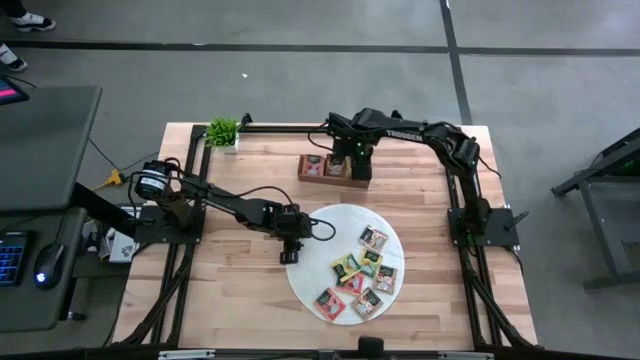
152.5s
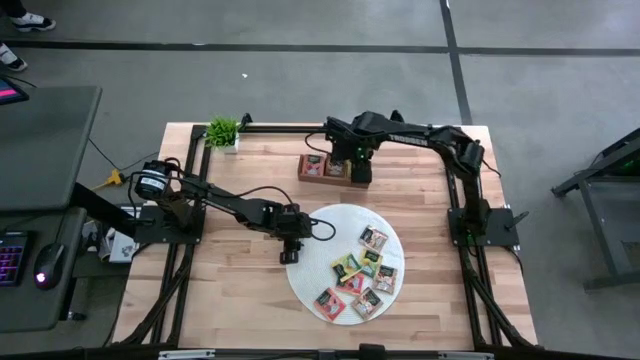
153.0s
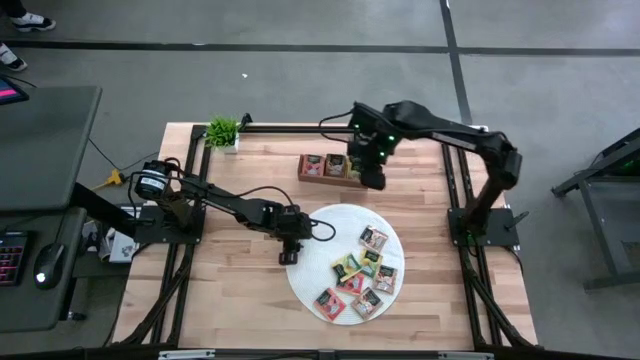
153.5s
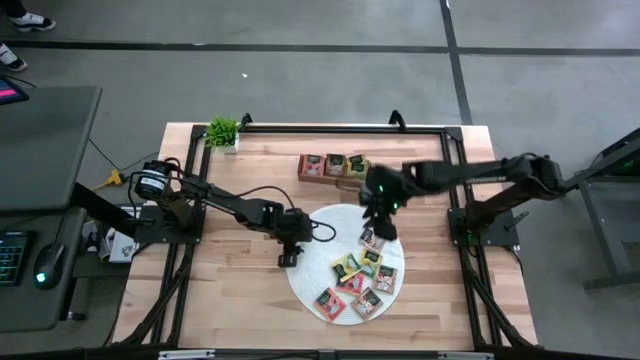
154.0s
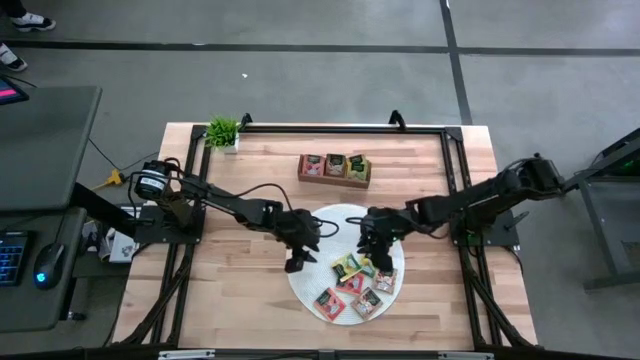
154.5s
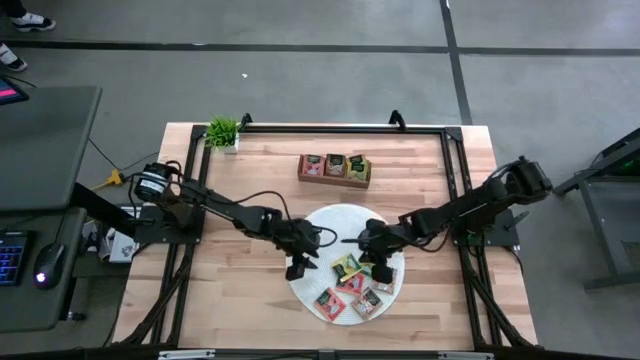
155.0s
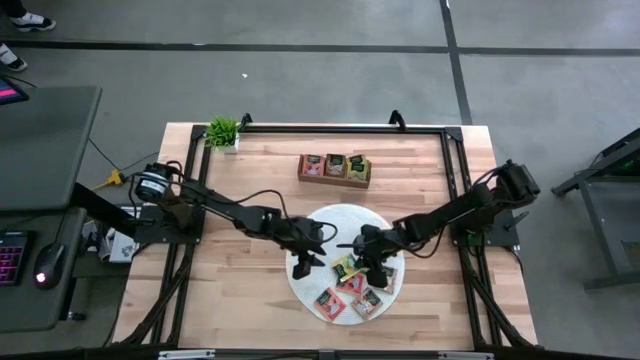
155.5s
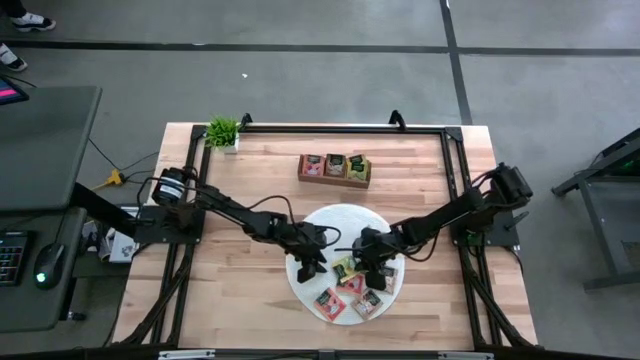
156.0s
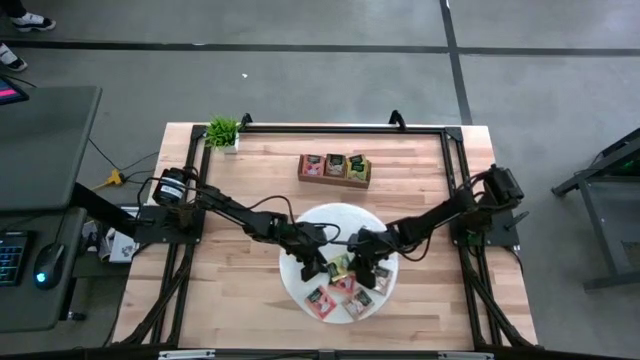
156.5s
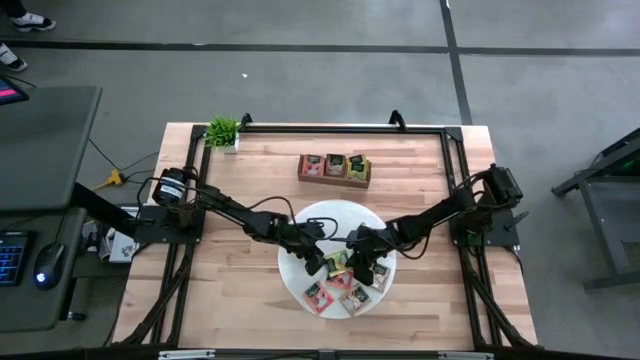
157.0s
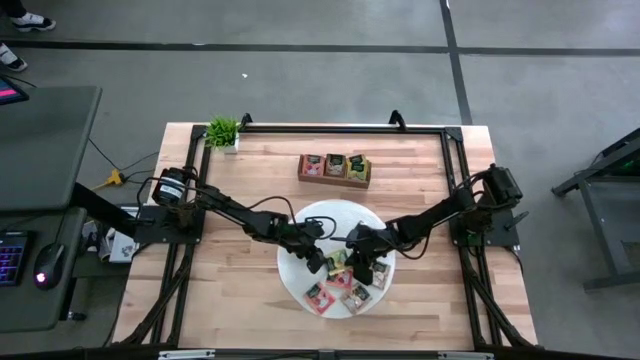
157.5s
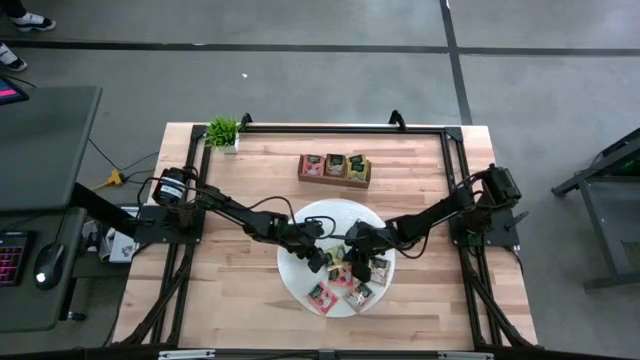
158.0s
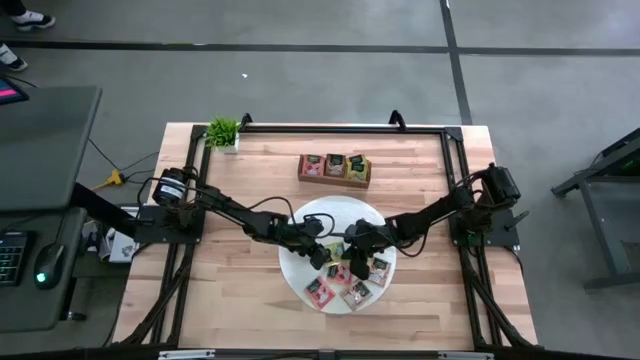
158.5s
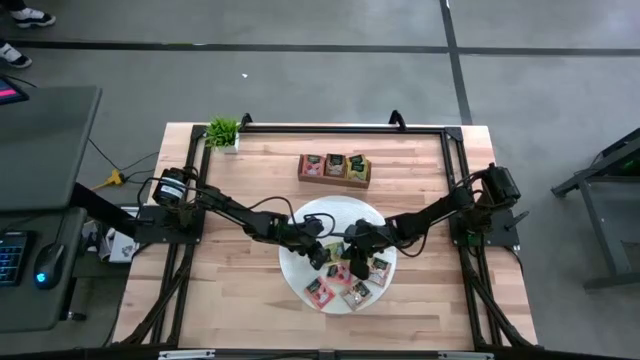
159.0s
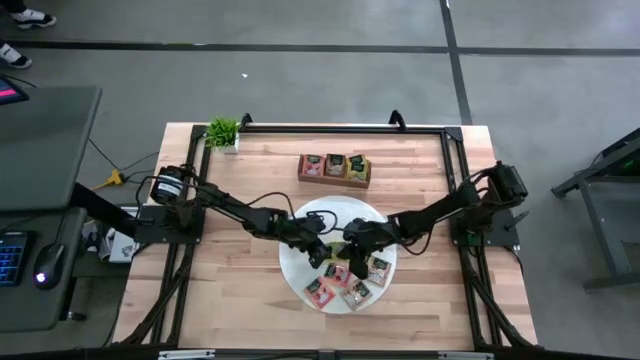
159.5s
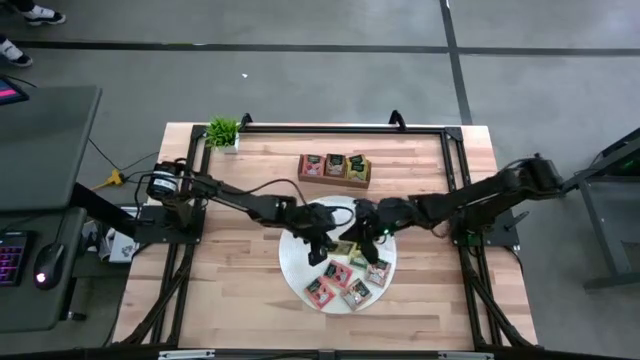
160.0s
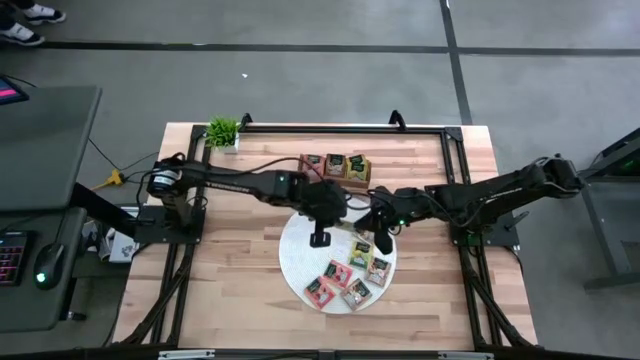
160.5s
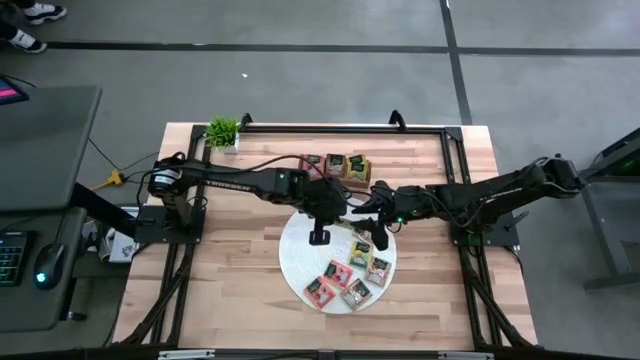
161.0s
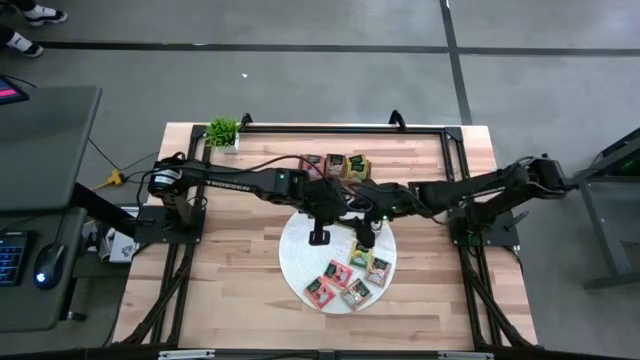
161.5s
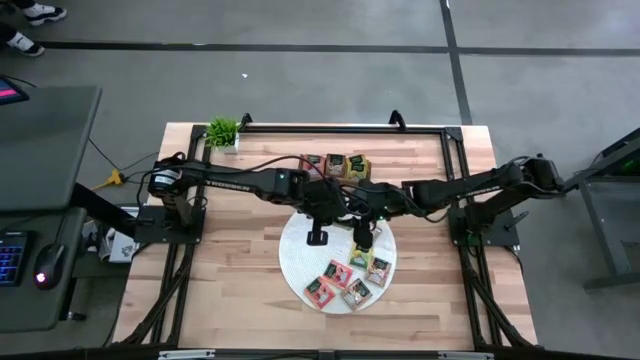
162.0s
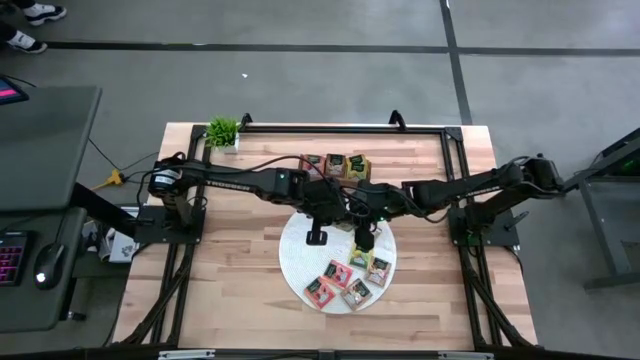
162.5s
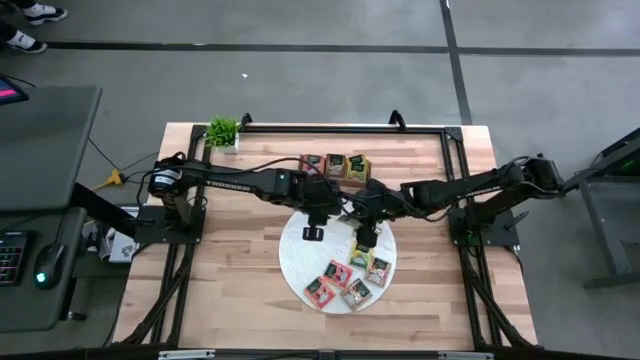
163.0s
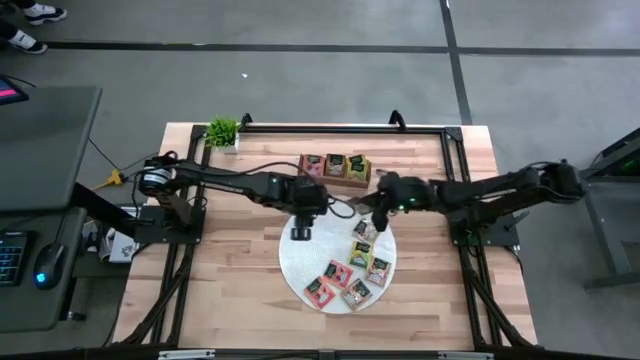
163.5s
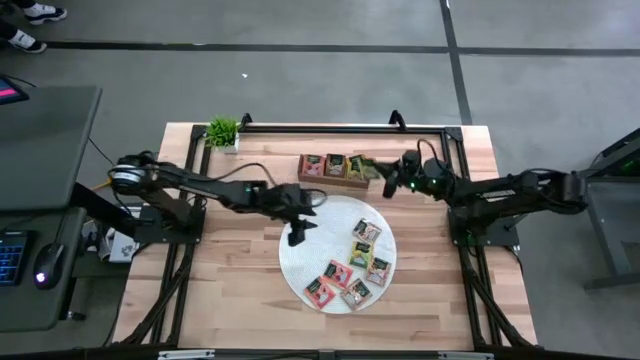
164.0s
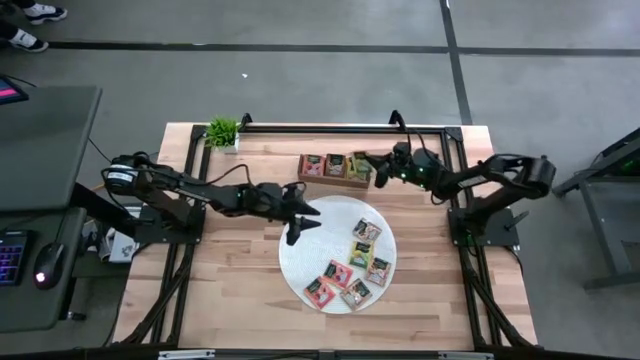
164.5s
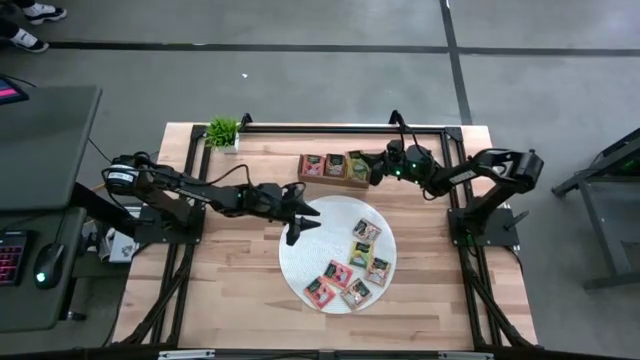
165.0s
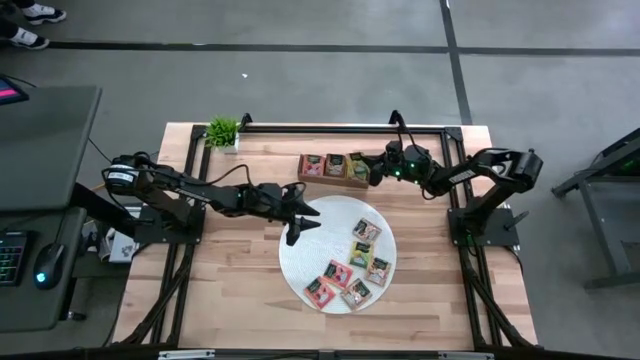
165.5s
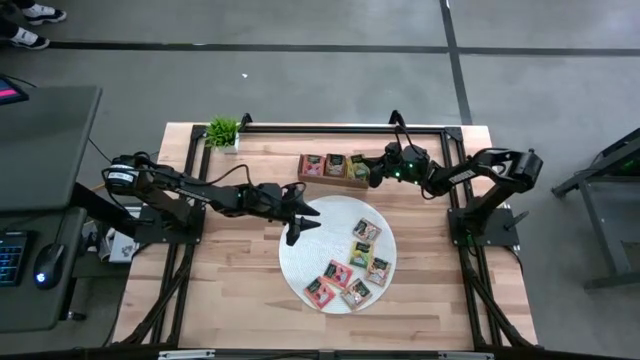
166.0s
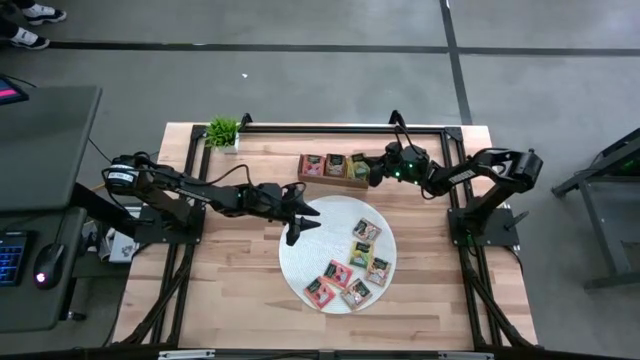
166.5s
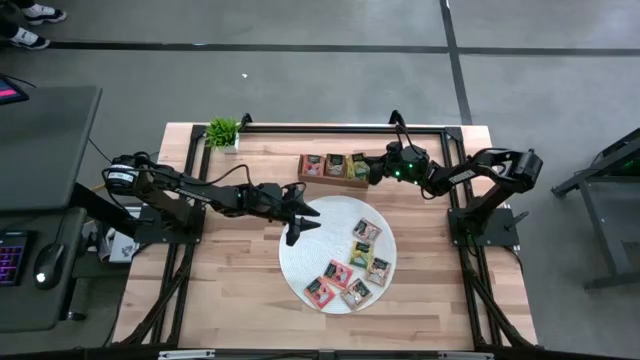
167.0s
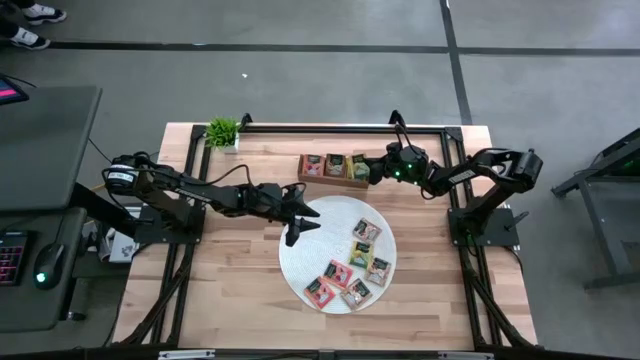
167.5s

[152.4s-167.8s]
Task: Pick & Place Tea
Put the yellow tea bag into the right section of the wooden organizer

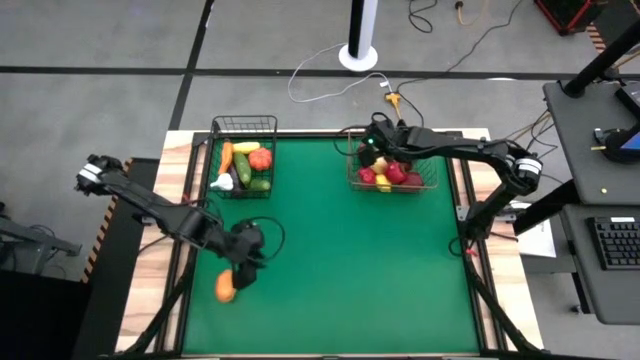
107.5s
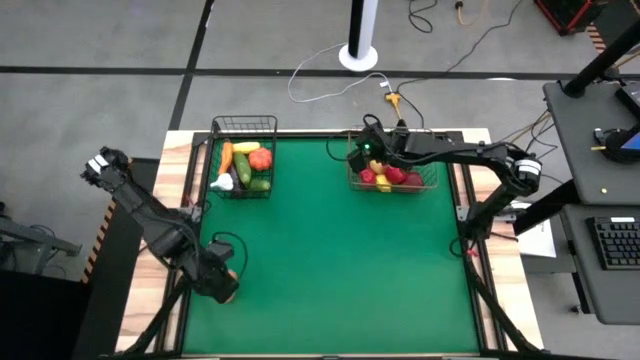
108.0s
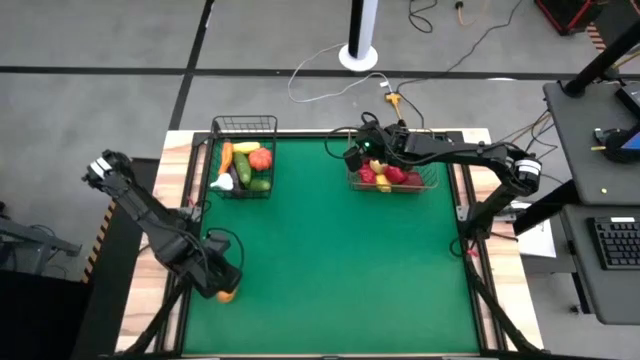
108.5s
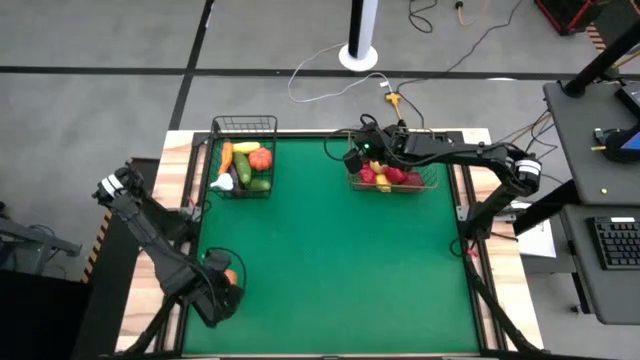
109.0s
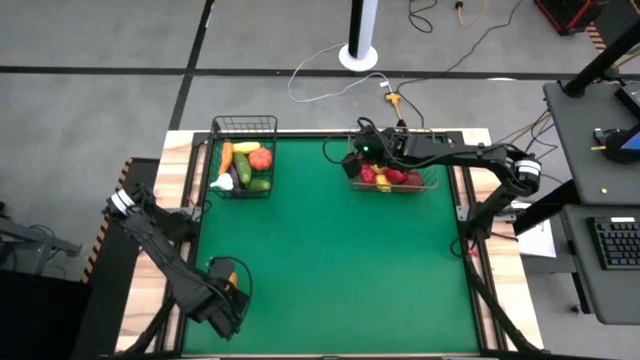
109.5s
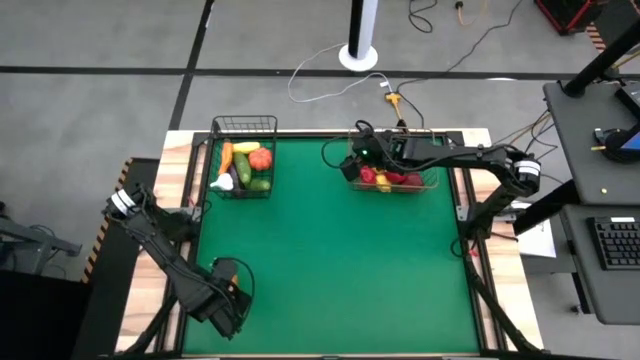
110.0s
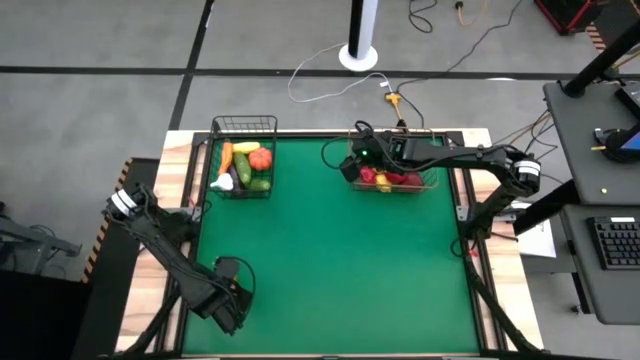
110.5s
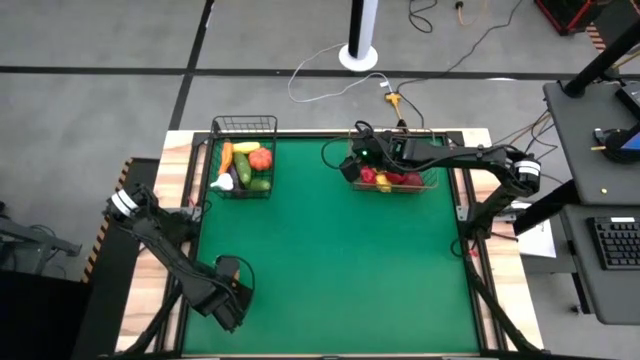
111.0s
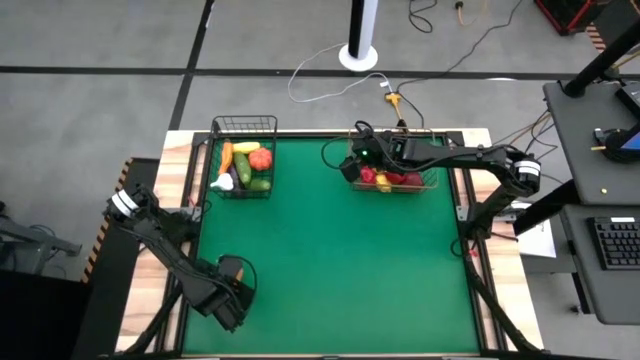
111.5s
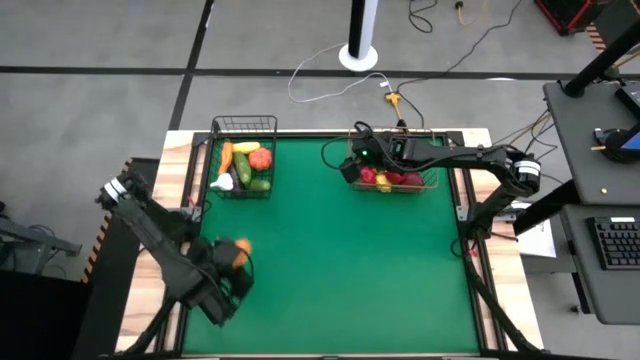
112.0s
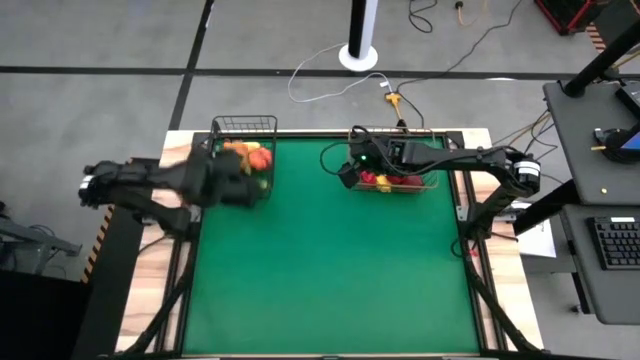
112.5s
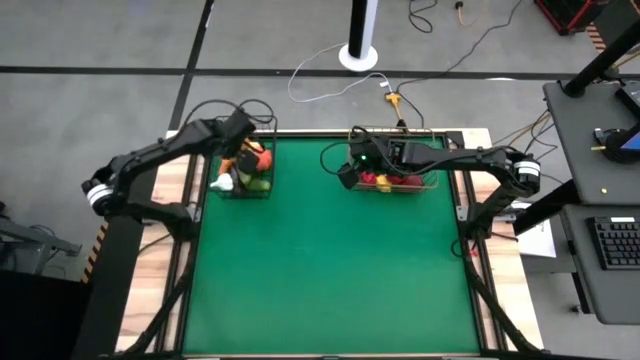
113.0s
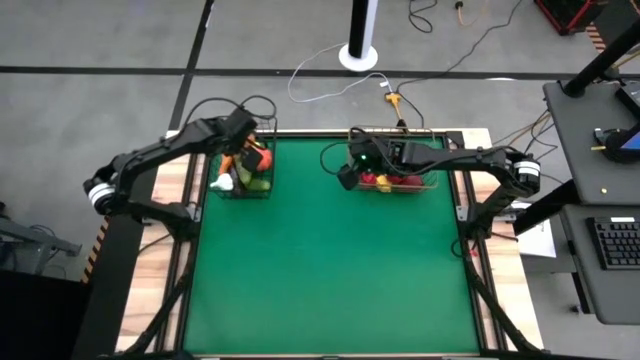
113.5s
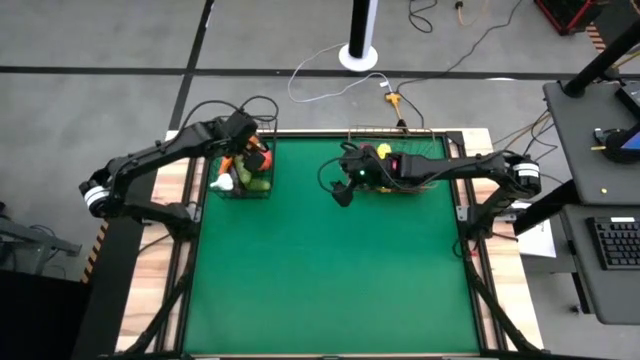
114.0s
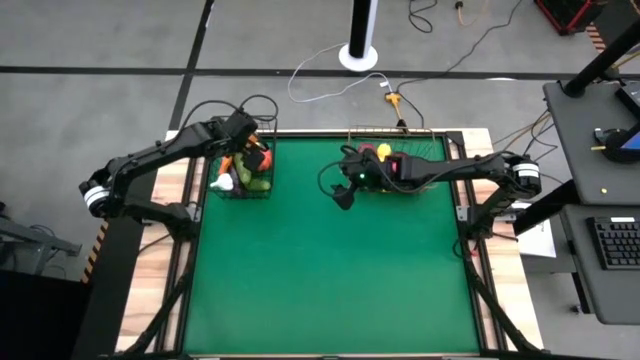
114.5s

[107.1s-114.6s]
Task: Sort produce into baskets
Put the yellow mango into the left wire basket
